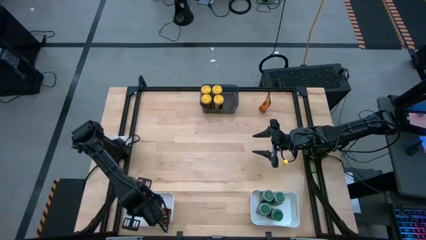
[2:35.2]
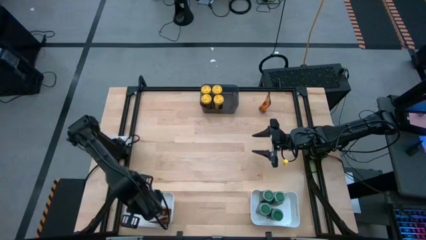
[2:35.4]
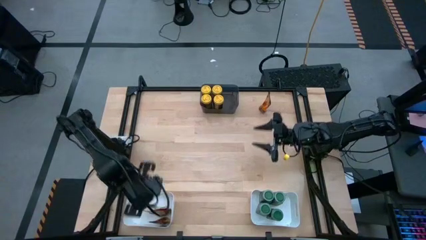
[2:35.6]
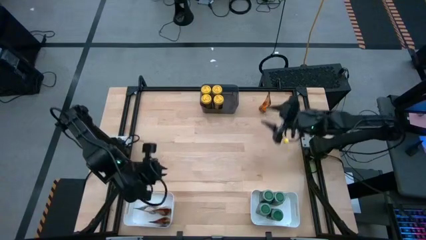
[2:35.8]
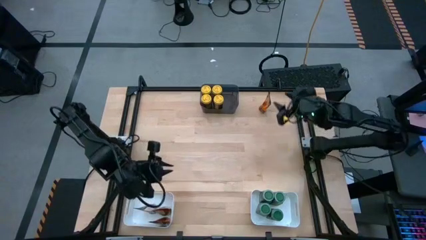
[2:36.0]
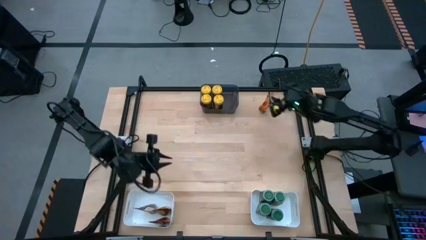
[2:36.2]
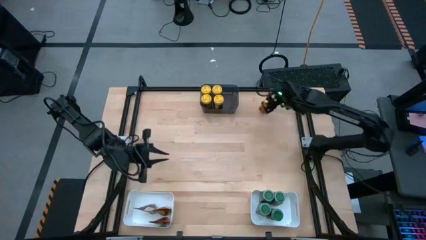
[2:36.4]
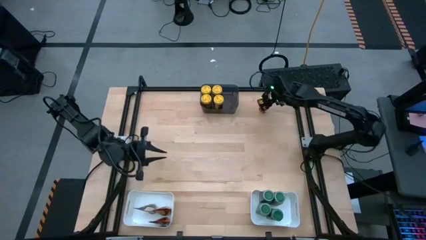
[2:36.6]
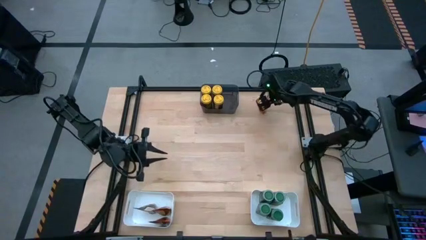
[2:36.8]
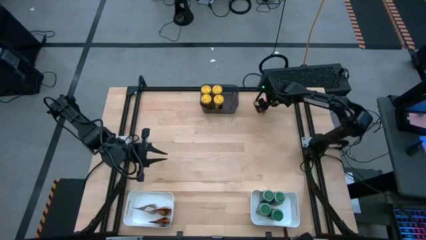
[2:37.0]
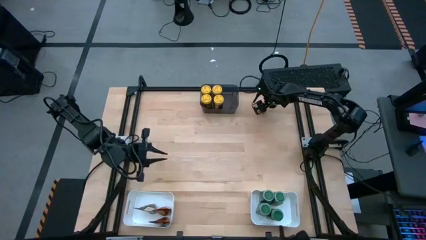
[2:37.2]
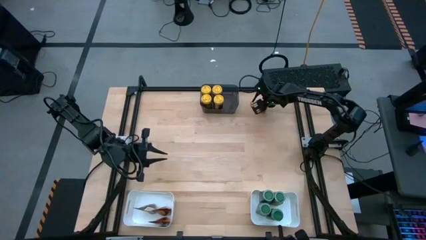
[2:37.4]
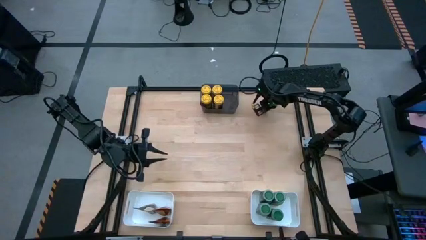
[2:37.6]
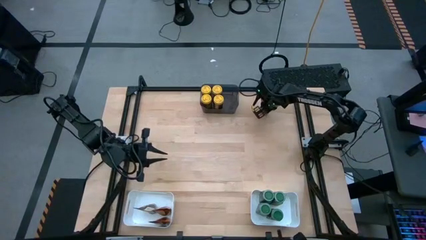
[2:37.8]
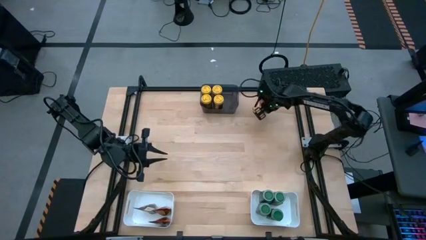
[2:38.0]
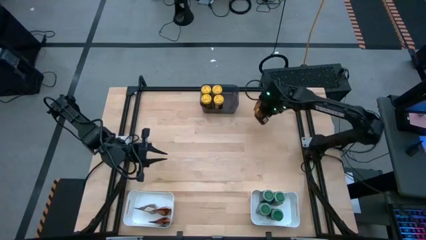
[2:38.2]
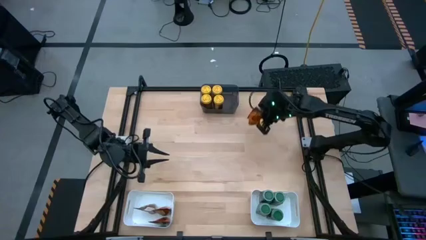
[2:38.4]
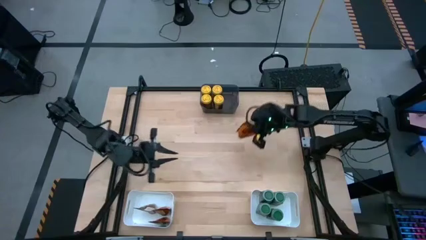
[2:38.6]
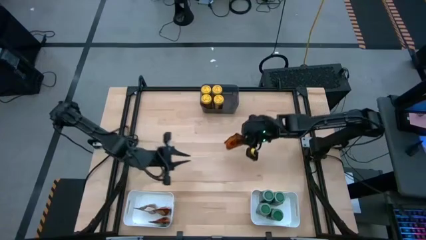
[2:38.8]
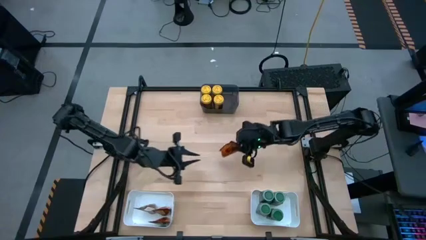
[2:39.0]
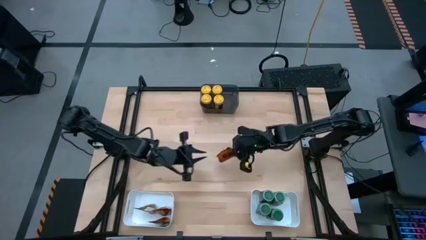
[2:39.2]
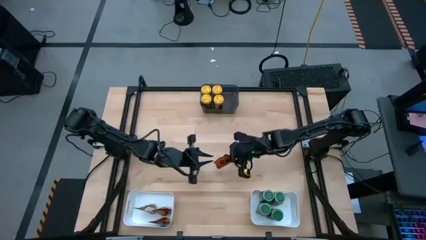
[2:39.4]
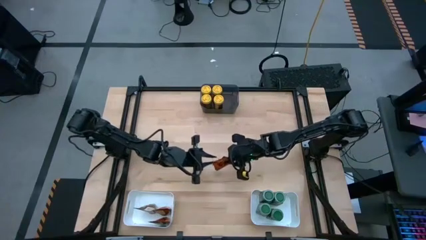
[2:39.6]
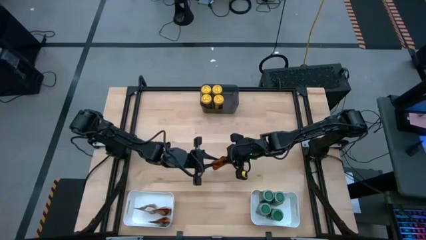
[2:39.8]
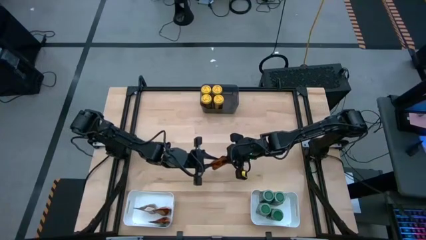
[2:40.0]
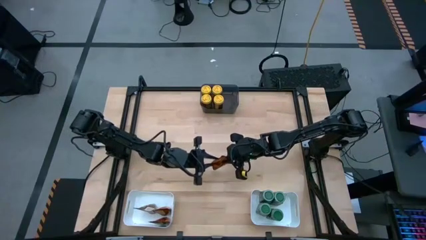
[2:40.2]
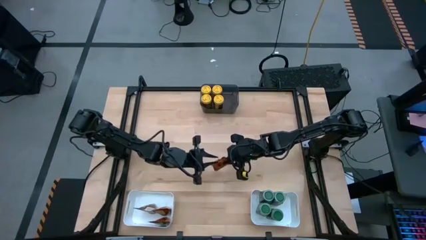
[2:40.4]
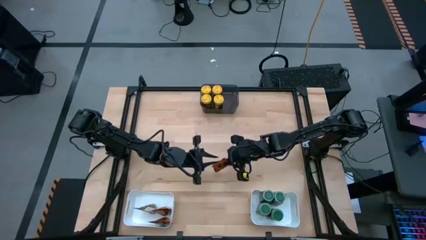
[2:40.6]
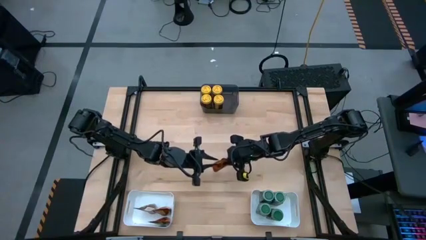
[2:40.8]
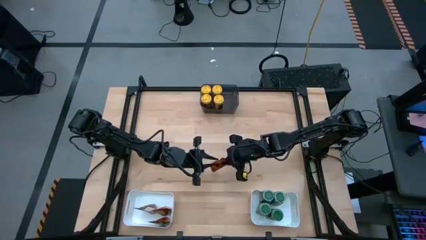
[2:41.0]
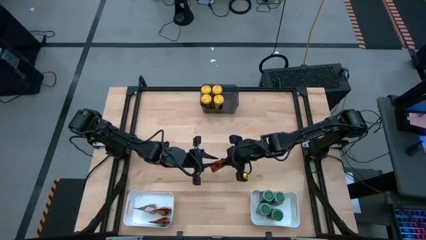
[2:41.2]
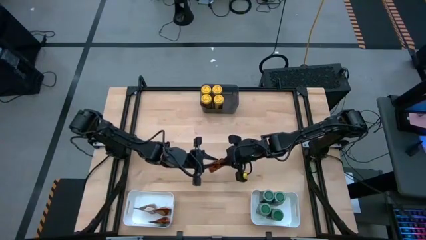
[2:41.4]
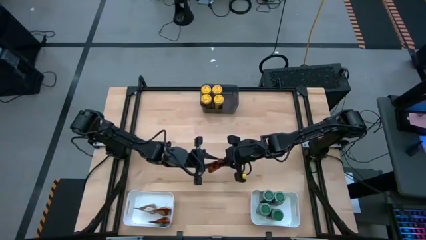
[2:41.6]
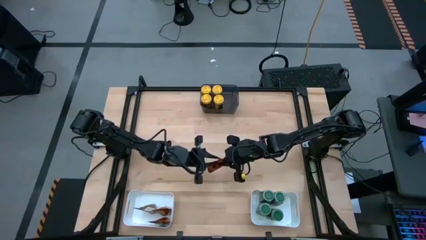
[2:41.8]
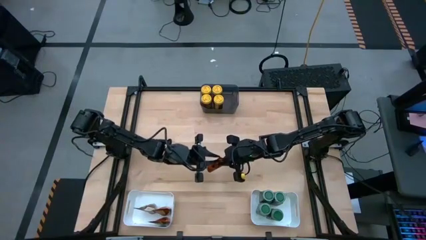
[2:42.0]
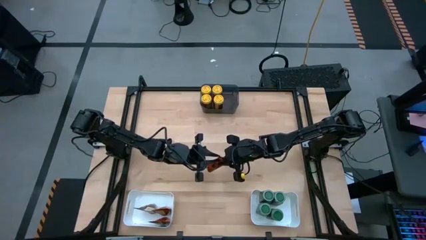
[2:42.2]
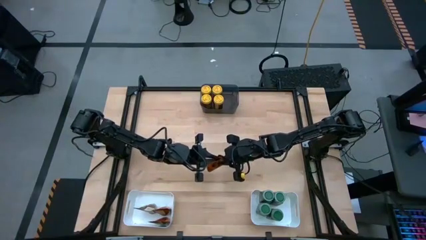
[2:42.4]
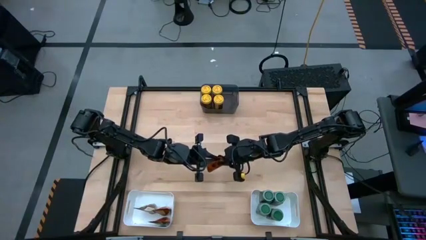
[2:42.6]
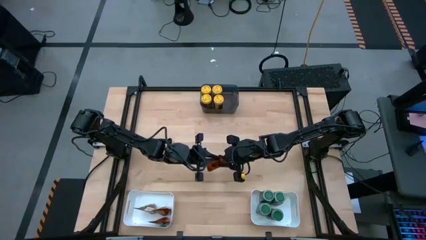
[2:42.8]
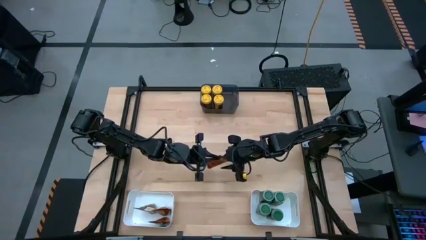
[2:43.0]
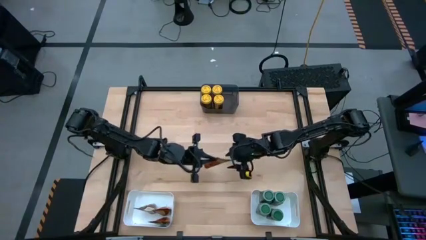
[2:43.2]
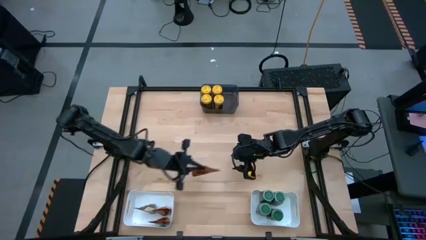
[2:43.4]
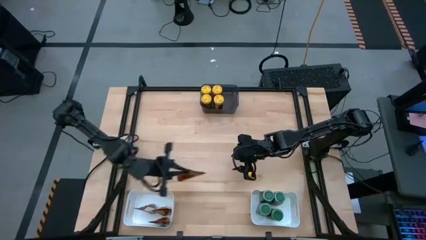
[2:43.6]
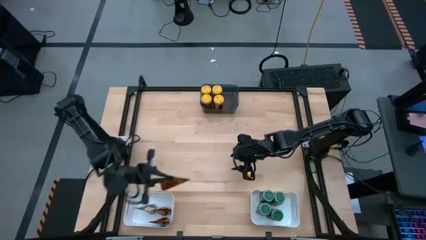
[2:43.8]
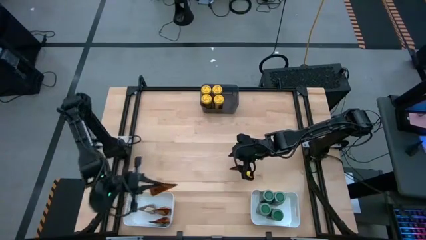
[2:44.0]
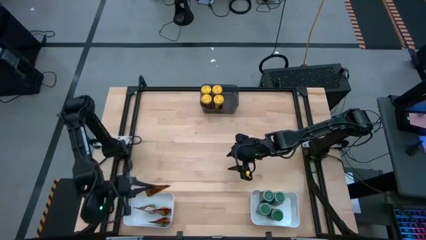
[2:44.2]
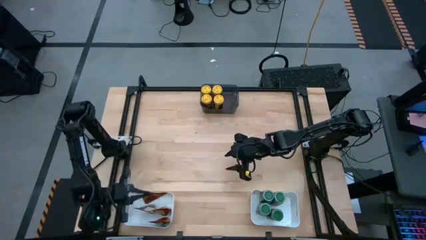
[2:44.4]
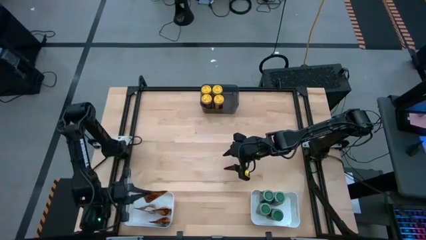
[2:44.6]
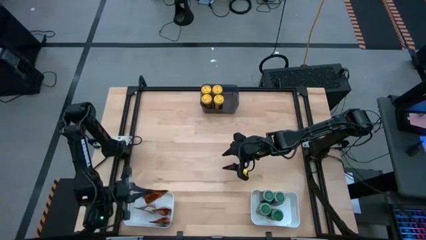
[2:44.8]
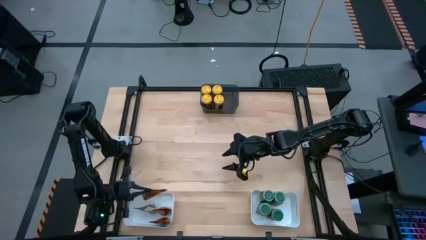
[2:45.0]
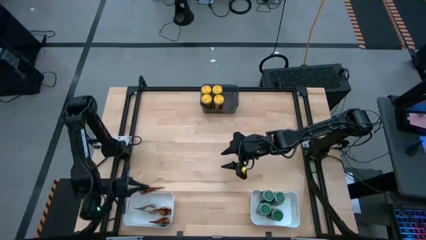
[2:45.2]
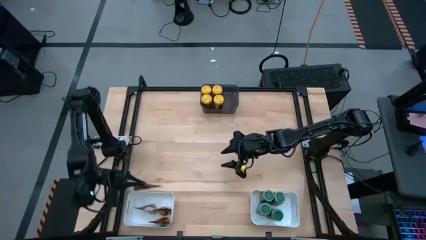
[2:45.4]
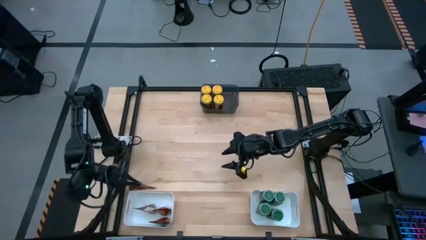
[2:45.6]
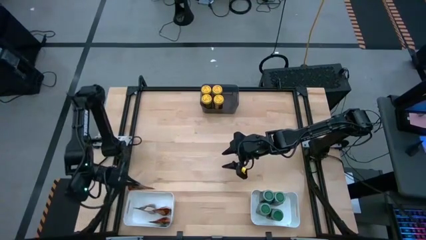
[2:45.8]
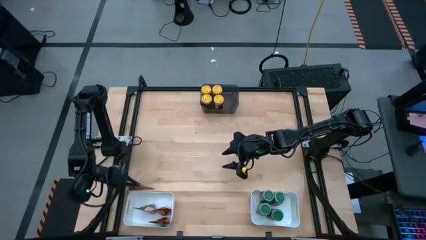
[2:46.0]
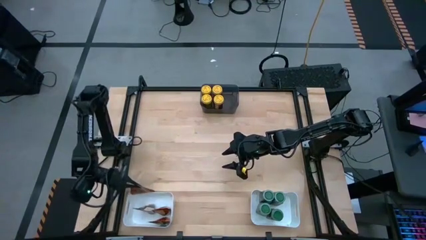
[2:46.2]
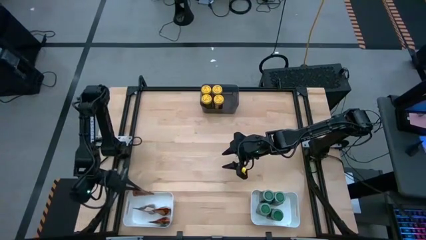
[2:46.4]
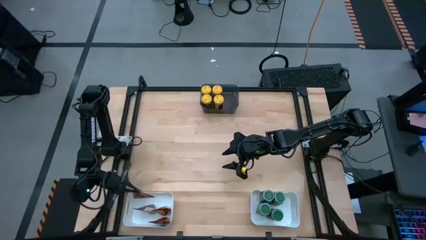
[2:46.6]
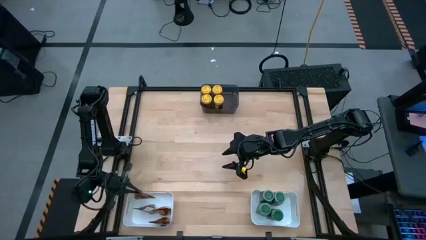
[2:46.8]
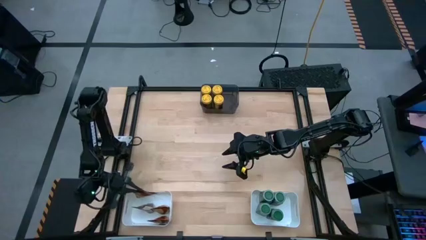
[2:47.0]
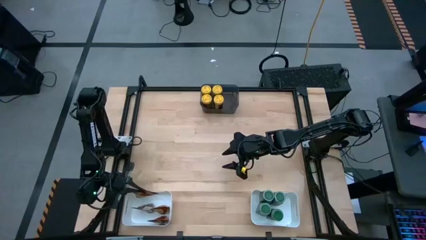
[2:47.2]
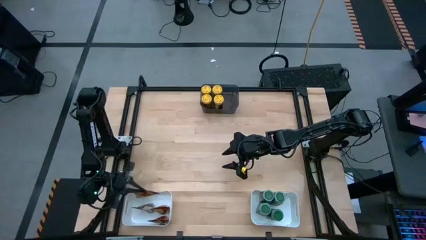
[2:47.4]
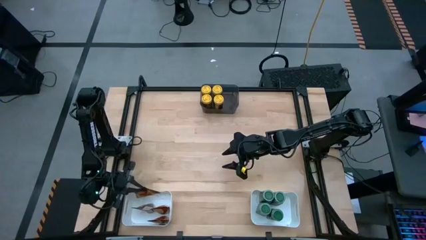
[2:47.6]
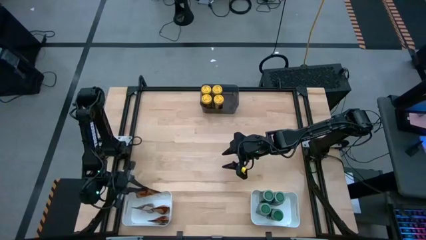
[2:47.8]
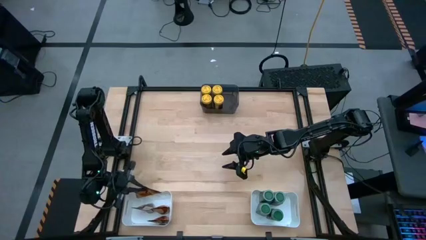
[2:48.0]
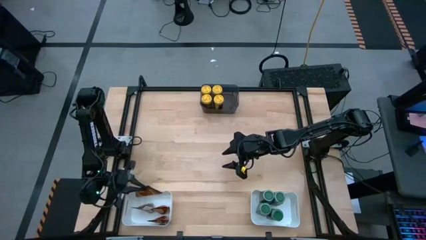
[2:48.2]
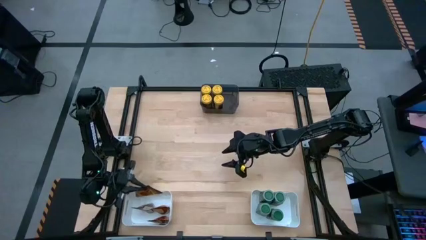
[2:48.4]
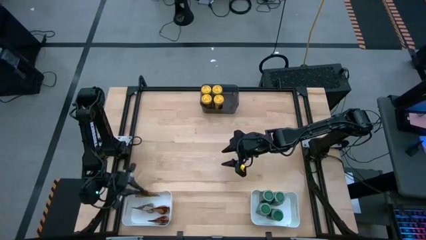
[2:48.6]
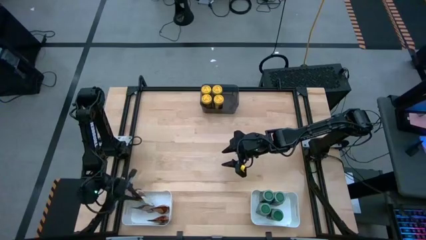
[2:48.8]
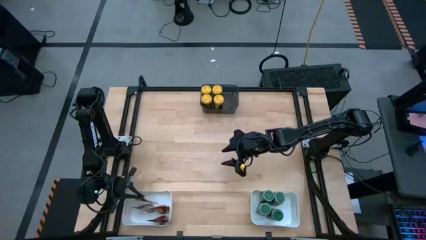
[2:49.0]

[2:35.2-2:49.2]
Task: Sort spices by type
Put the orange seasoning pack into the left white bin

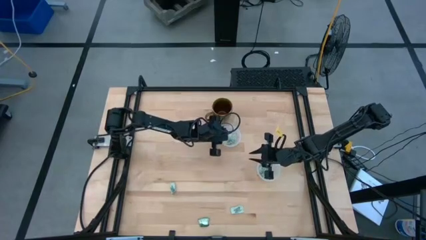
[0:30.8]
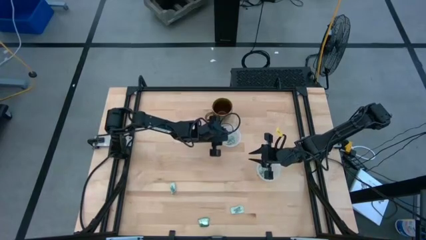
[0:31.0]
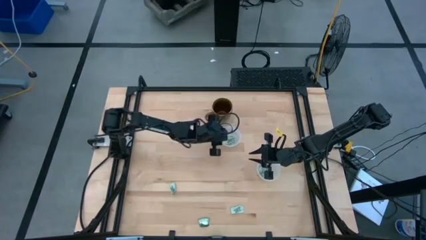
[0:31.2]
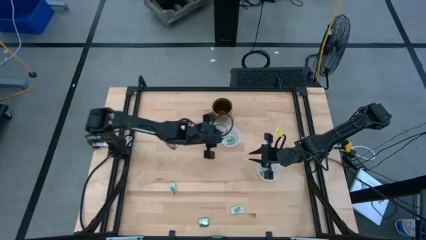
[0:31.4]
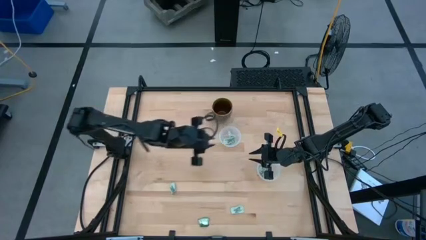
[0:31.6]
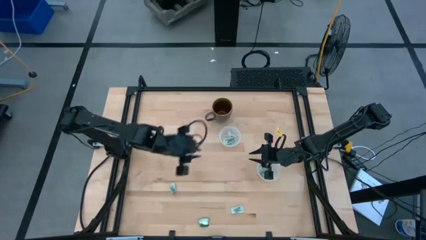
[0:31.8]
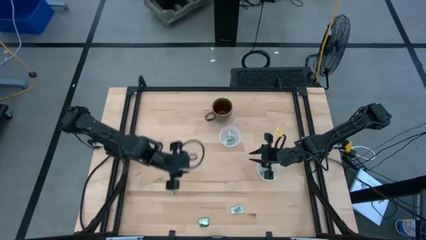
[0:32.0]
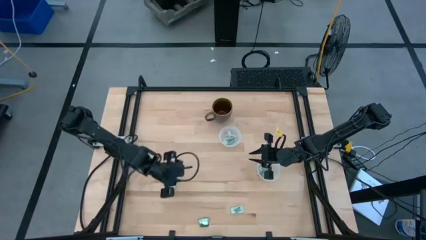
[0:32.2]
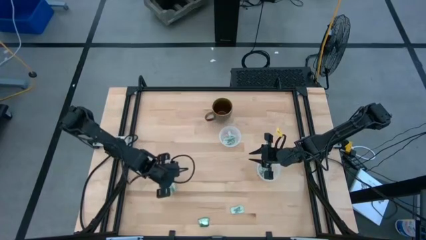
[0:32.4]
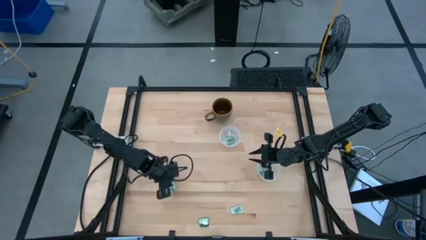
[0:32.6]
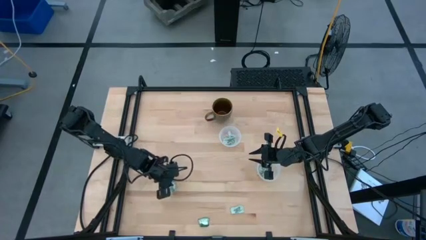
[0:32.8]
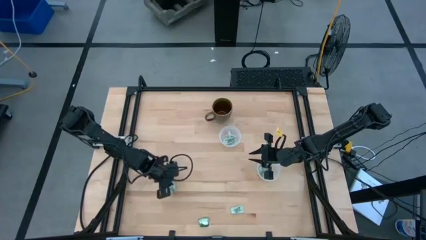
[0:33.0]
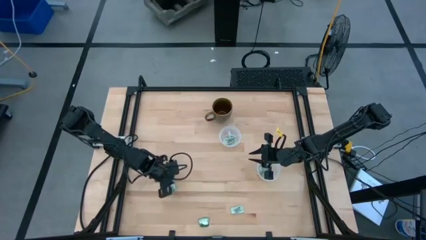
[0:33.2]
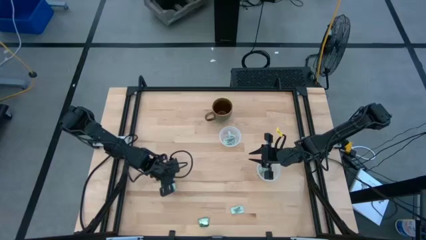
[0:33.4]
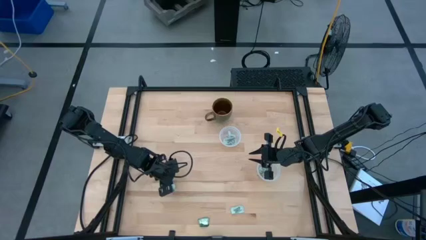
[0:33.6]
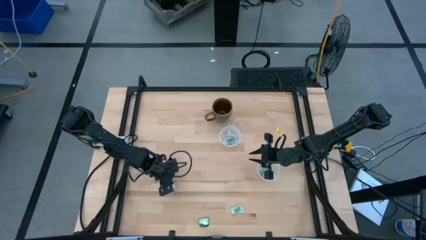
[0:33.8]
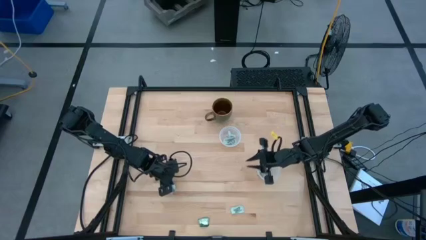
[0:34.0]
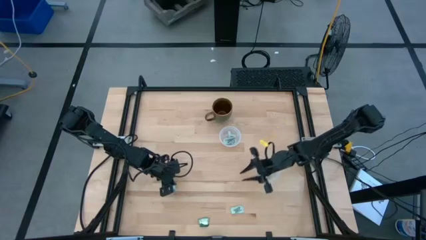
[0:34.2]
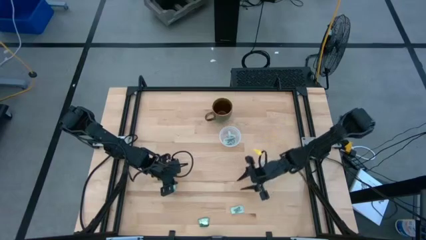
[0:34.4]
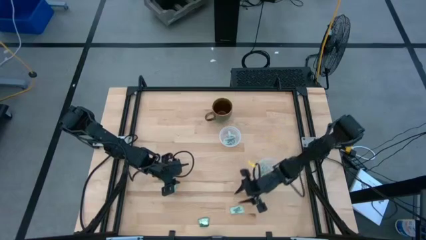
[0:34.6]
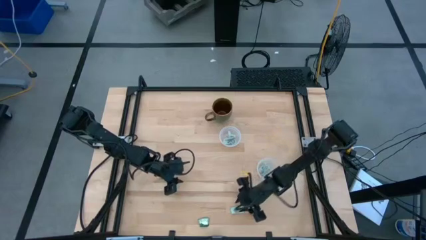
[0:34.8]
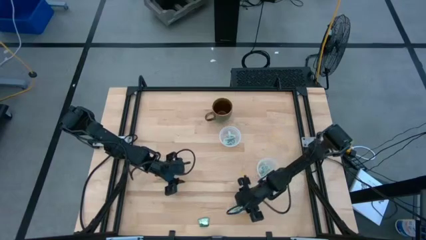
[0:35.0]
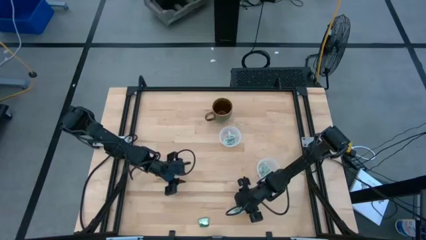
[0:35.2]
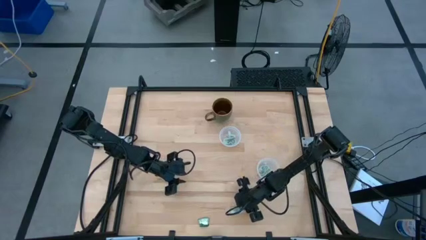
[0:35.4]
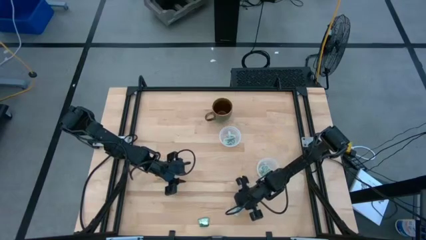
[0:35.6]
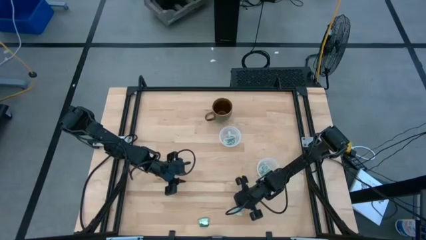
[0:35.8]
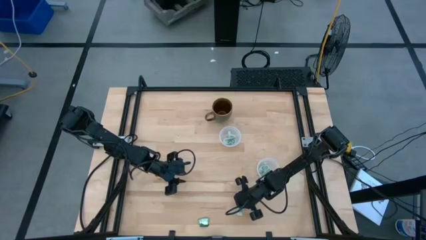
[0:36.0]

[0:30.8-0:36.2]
Task: Pick and place items into bin
Put the stevia packet into the bottom transparent bin
